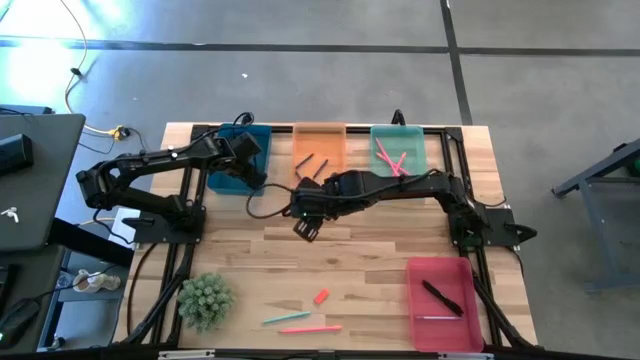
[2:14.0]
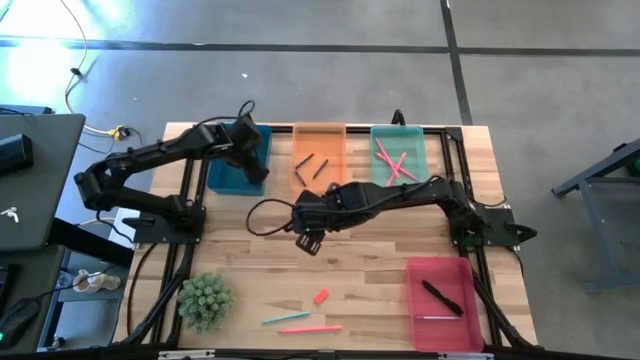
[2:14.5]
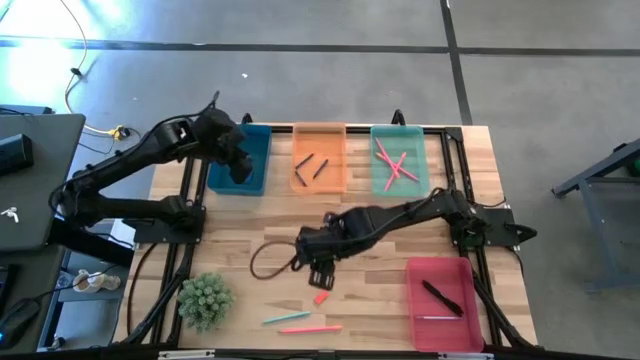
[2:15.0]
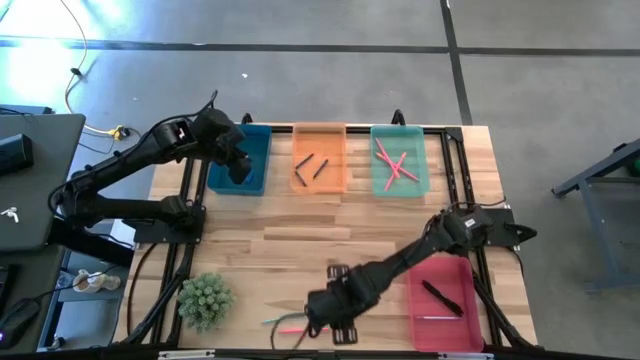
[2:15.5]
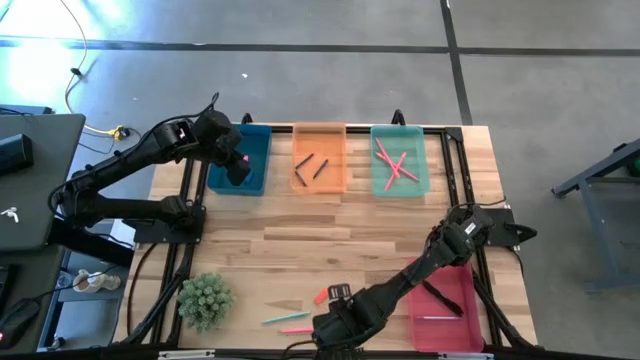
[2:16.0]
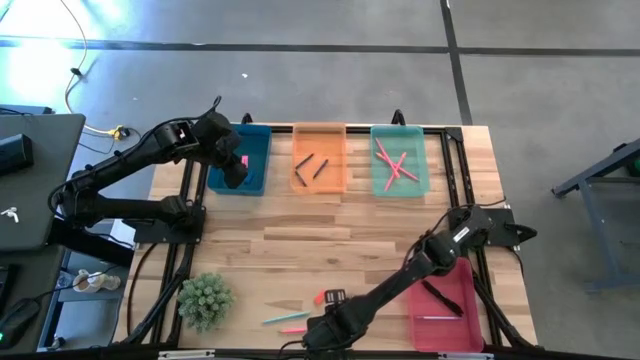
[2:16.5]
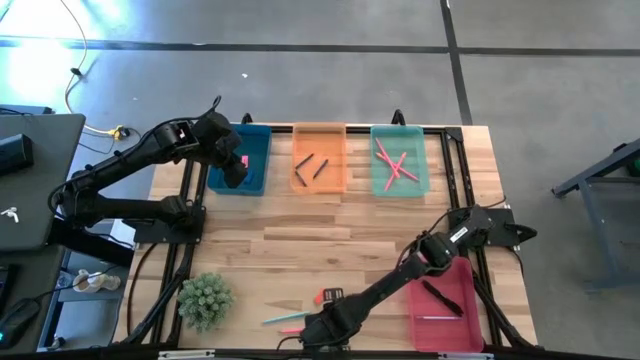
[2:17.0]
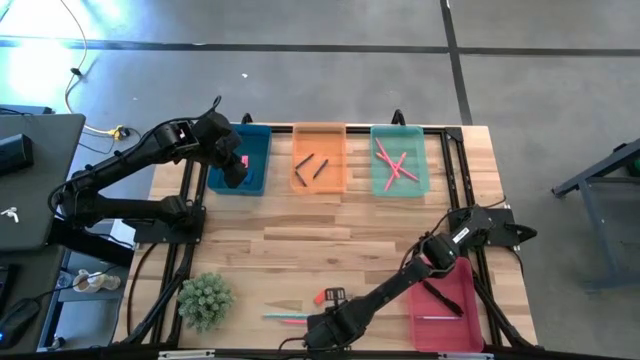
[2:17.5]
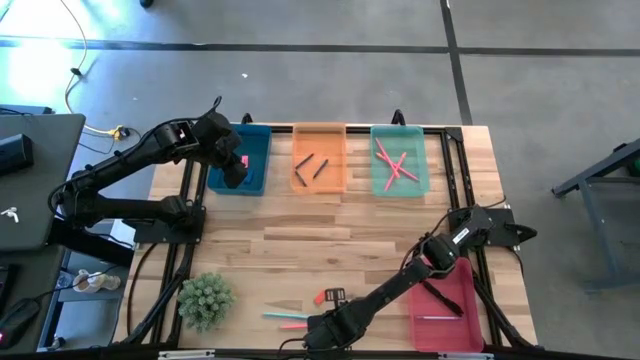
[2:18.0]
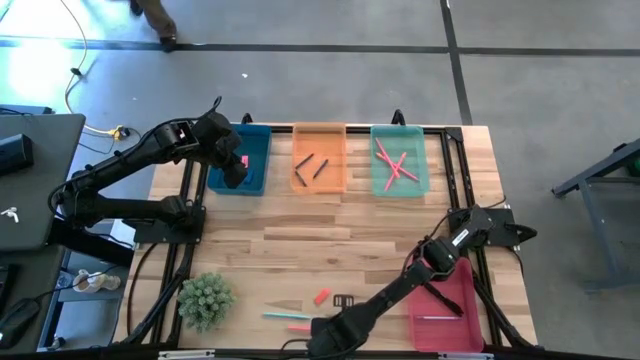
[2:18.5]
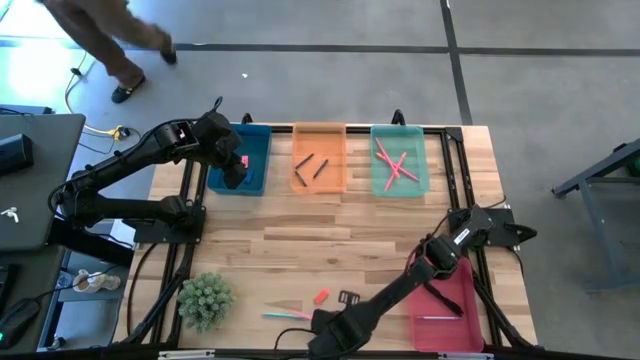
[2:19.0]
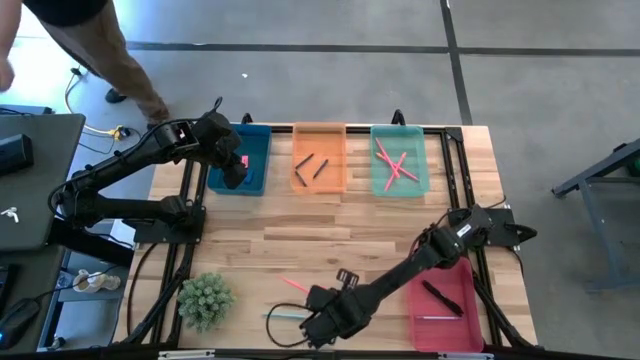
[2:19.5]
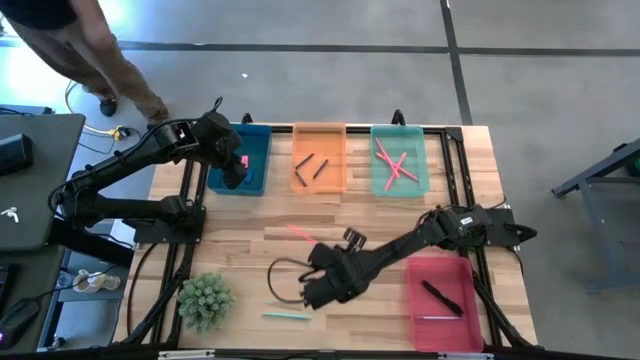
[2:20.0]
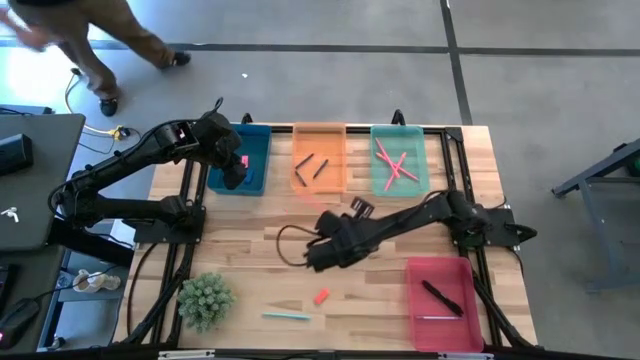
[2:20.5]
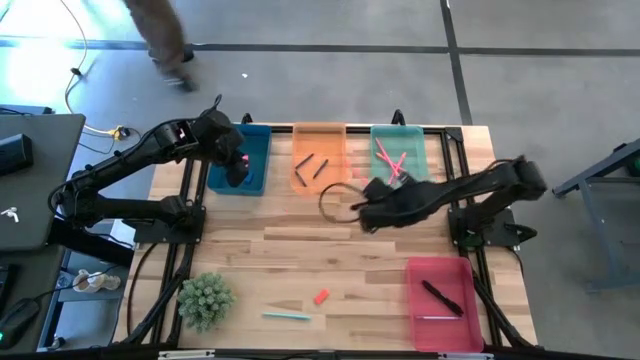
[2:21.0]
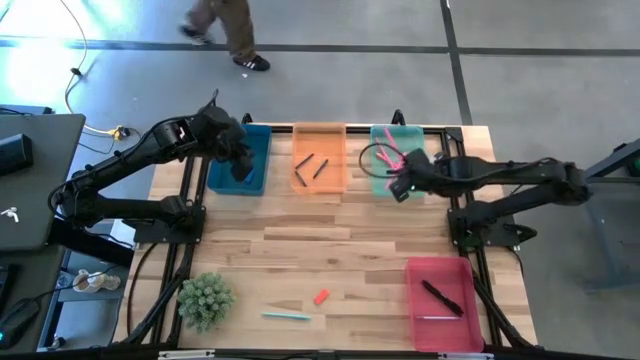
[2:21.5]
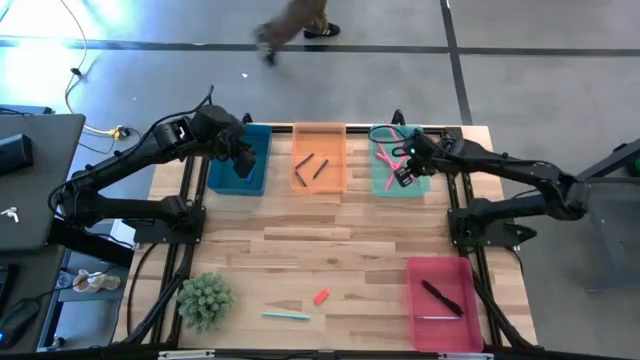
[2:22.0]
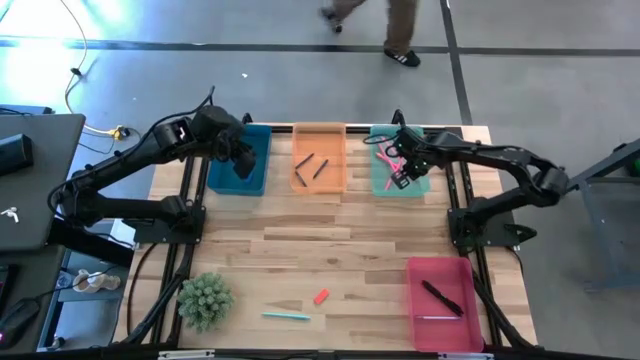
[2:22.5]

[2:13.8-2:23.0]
Task: Sort crayons/erasers/pens/pencils in bins
Put the pink pencil into the blue bin

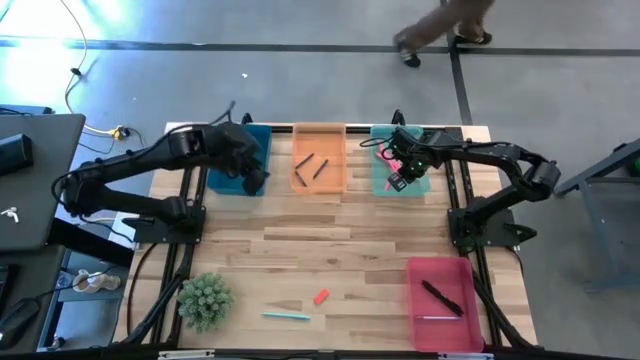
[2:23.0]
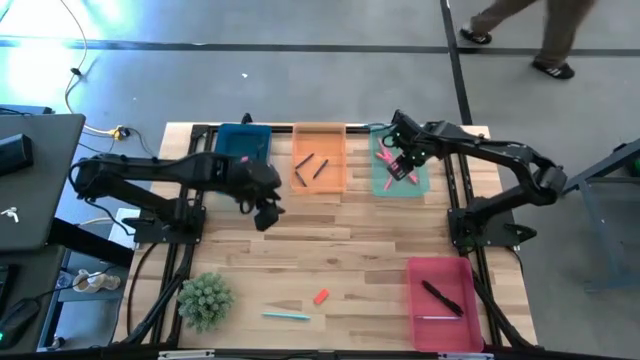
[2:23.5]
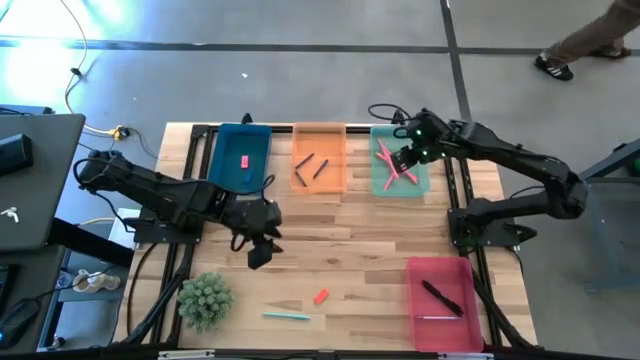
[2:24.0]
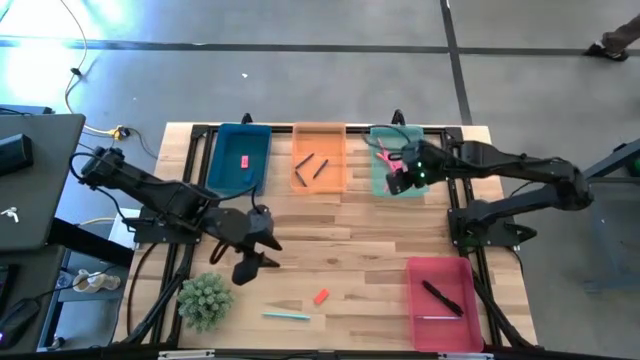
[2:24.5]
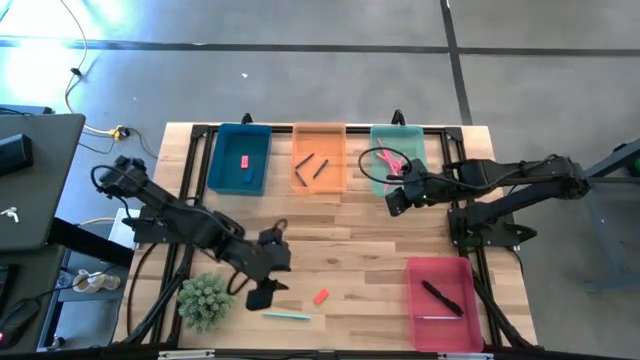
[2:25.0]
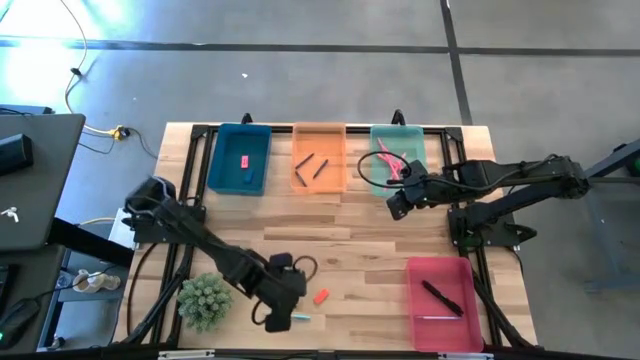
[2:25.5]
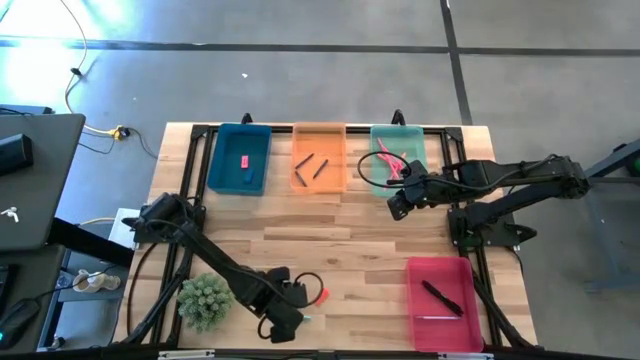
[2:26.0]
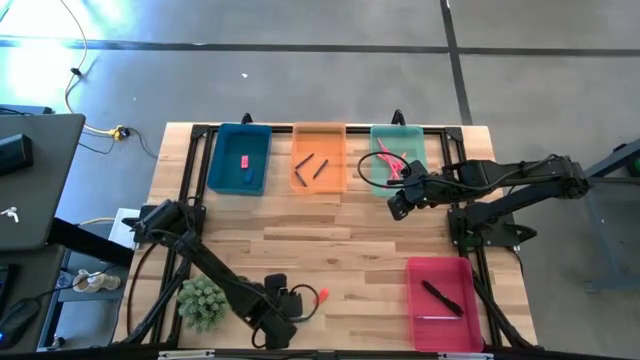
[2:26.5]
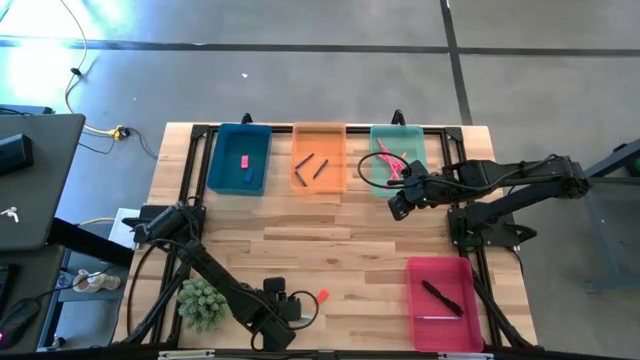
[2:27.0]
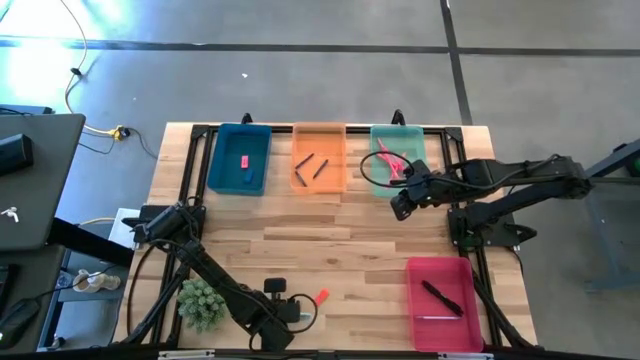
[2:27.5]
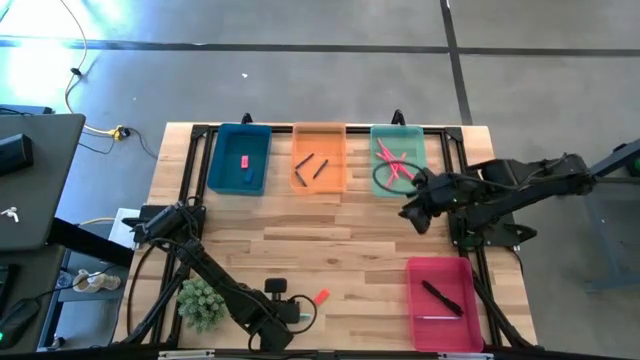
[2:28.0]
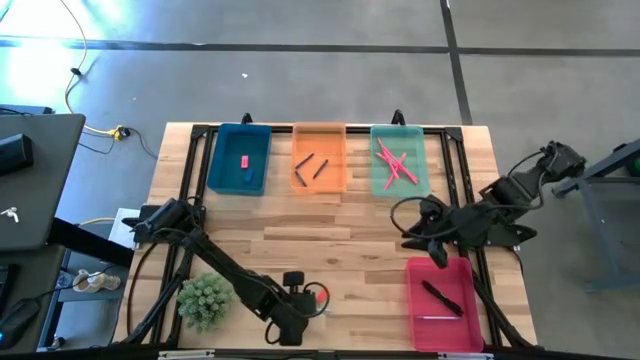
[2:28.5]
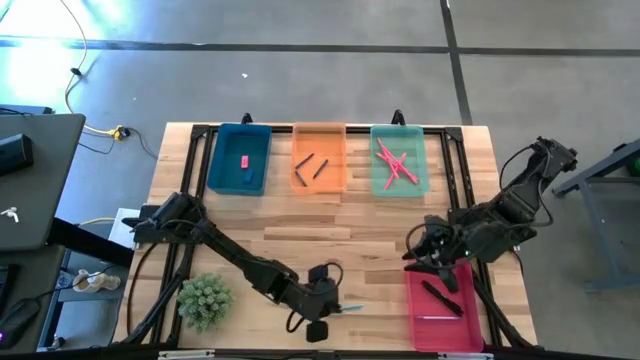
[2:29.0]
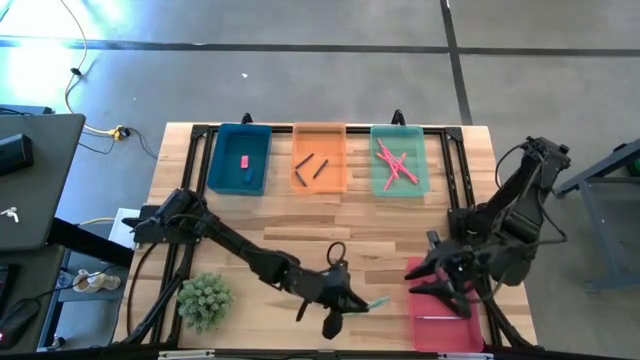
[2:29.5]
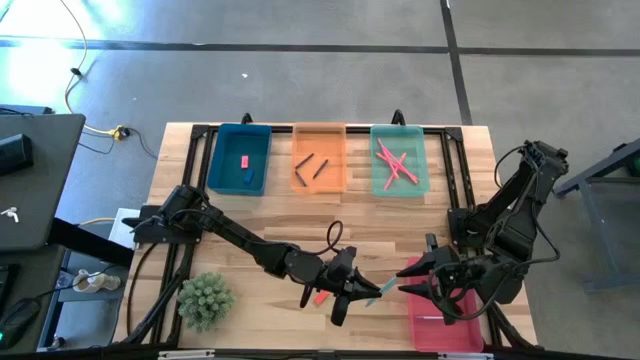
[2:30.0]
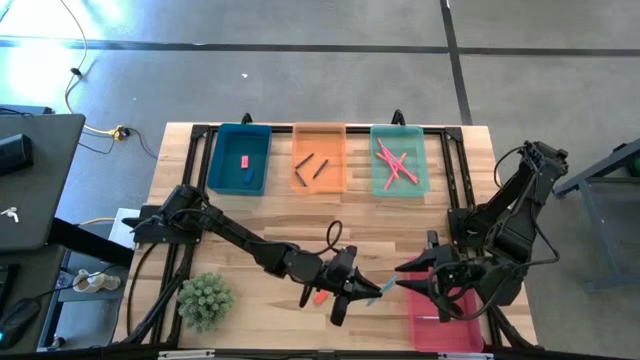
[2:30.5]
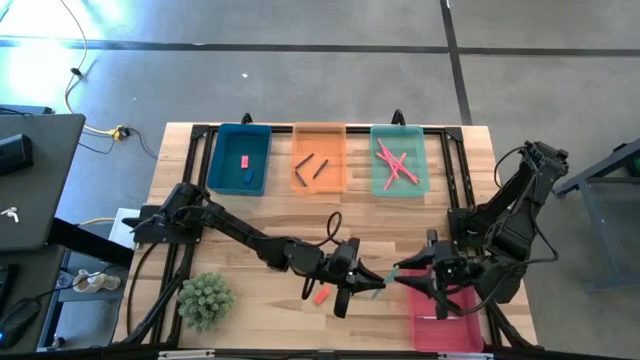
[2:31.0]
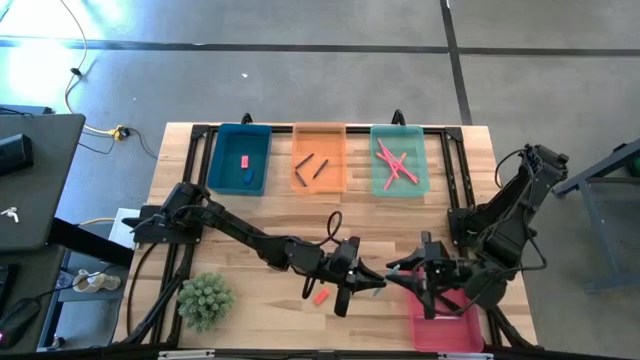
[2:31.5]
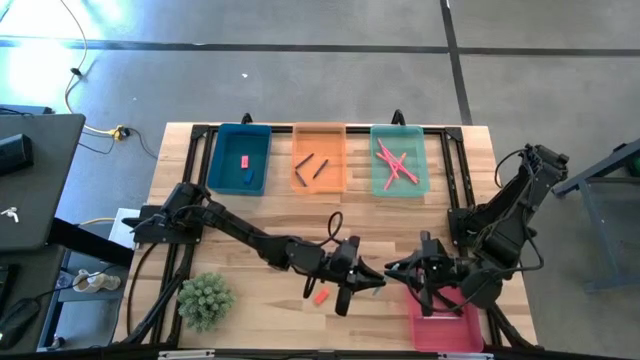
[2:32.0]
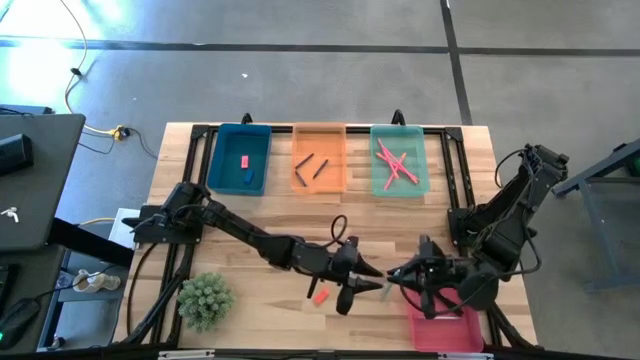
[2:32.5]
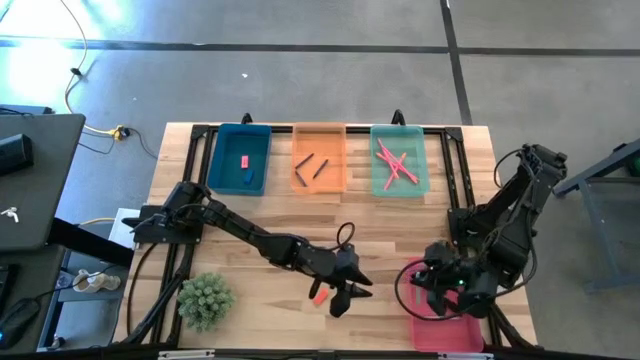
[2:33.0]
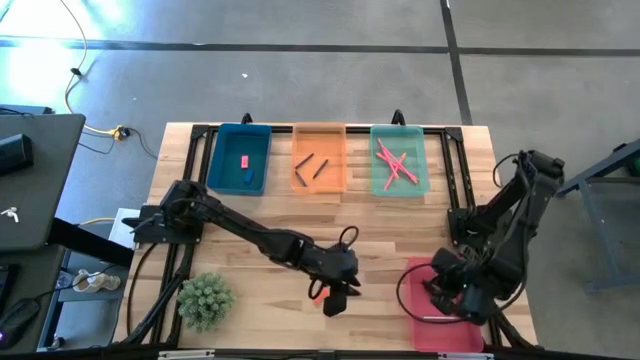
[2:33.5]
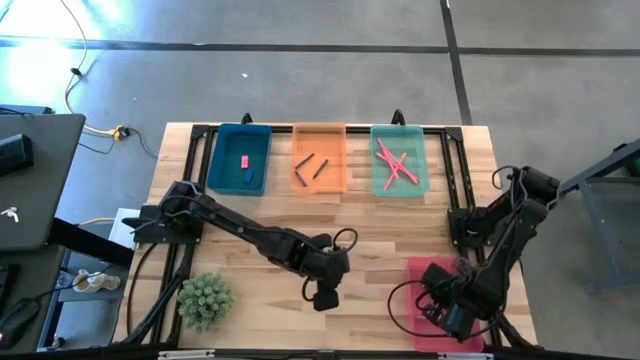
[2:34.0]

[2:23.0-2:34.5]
Put the blue pen into the pink bin

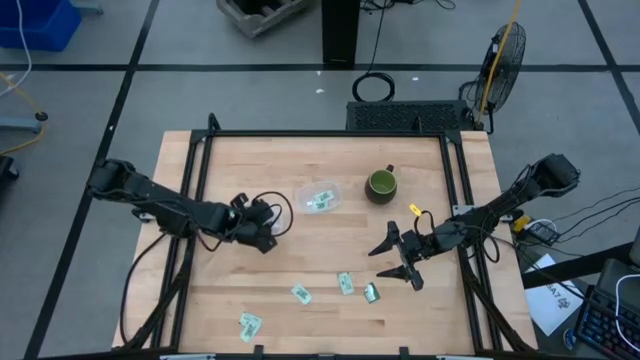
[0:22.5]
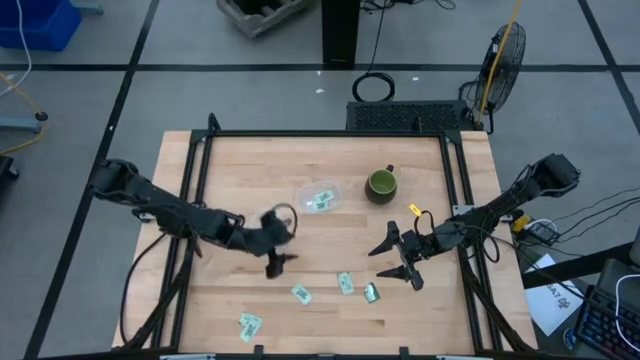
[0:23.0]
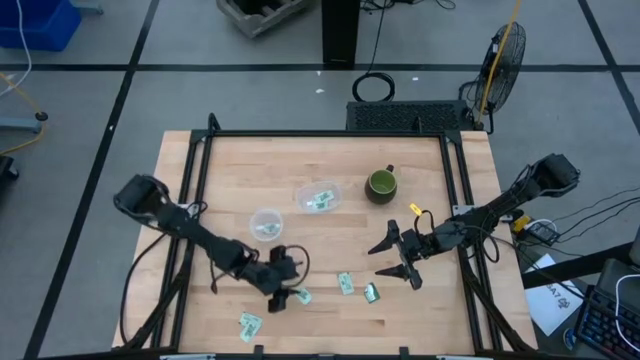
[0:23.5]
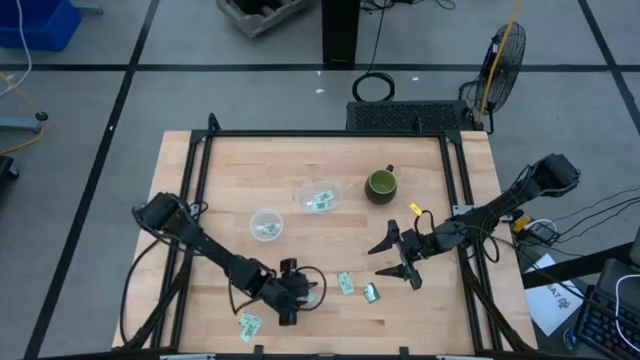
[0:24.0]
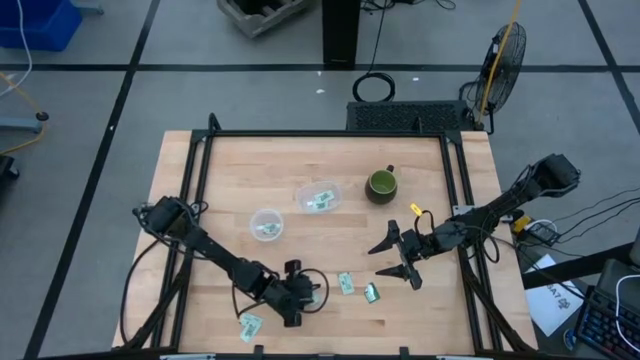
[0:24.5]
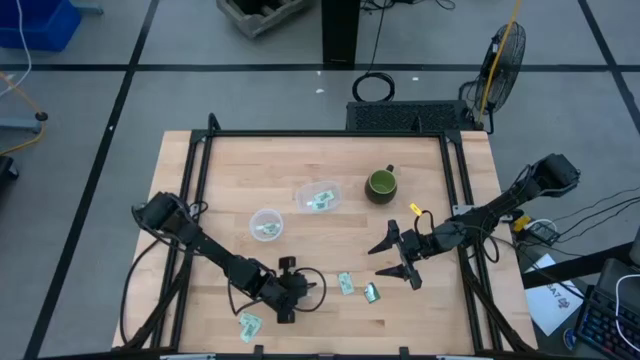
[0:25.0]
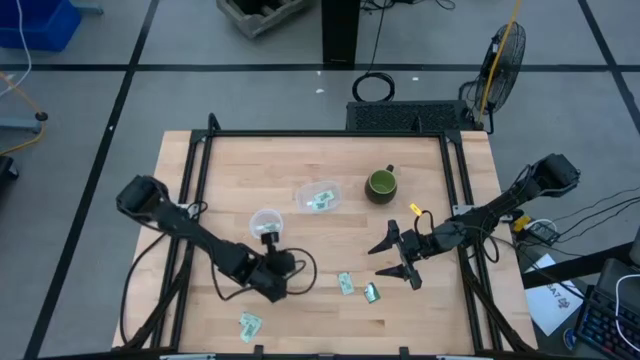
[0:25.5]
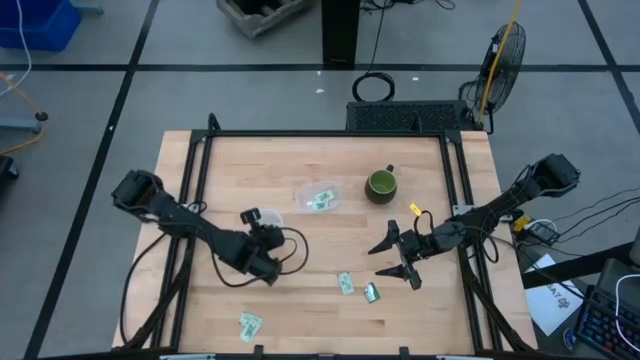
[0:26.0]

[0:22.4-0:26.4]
Task: Pick and place Stevia / Truvia into bins
Put the stevia packet into the round container
